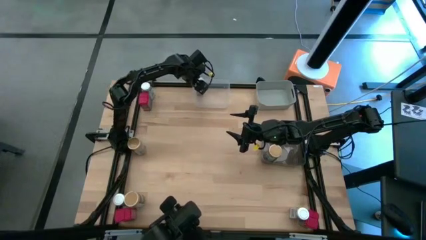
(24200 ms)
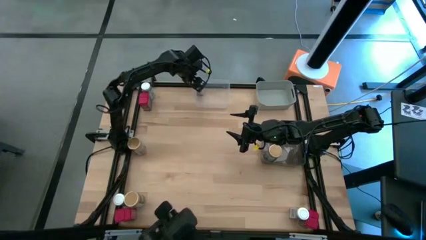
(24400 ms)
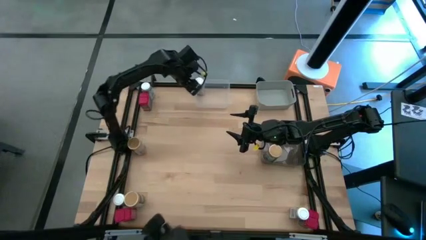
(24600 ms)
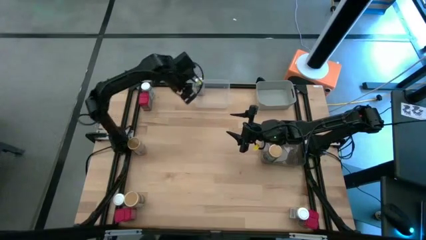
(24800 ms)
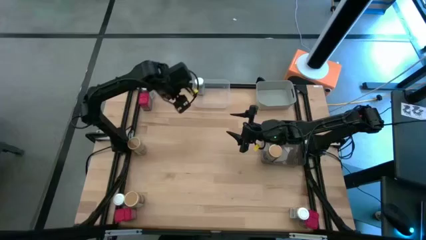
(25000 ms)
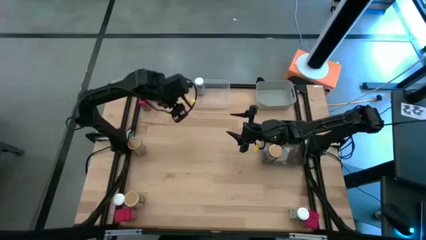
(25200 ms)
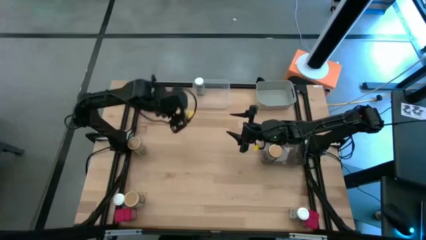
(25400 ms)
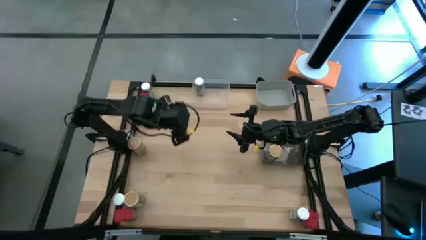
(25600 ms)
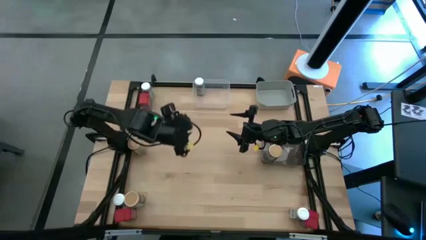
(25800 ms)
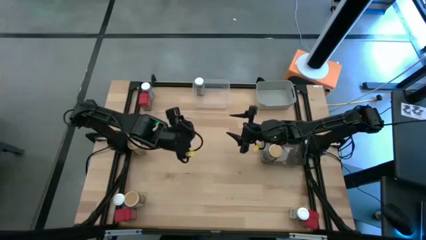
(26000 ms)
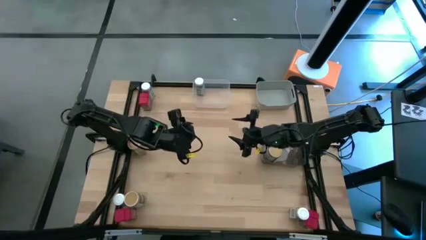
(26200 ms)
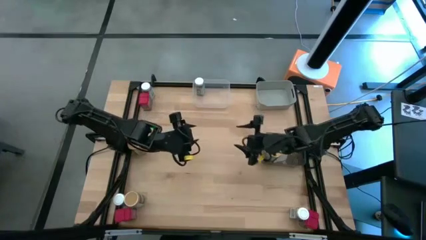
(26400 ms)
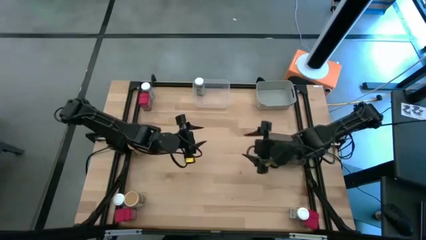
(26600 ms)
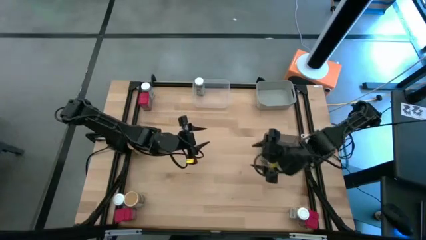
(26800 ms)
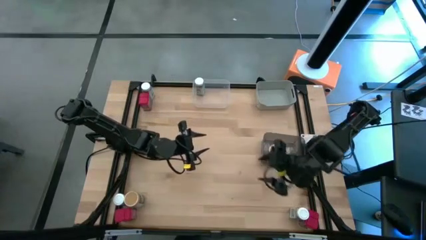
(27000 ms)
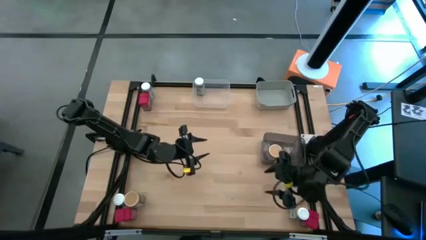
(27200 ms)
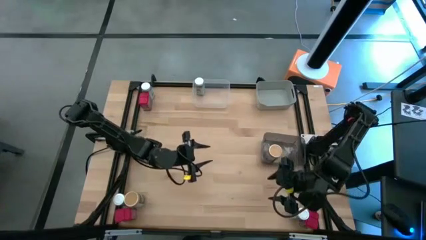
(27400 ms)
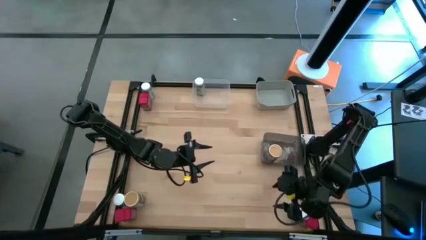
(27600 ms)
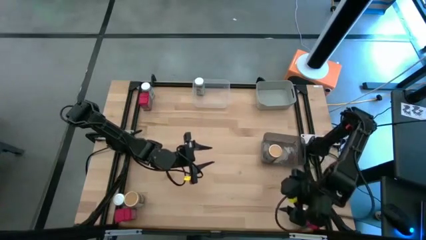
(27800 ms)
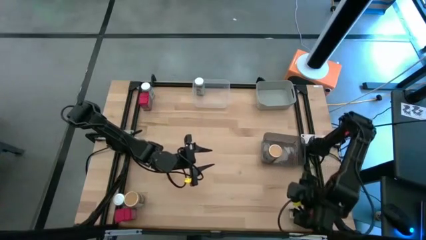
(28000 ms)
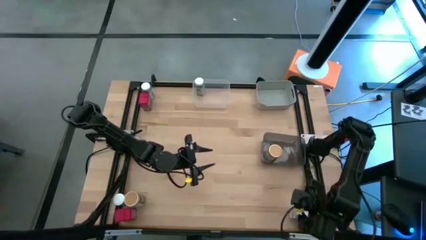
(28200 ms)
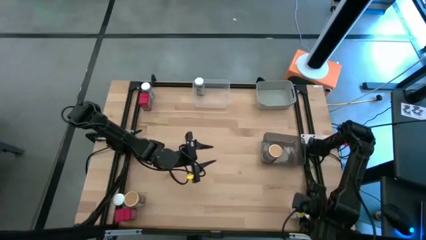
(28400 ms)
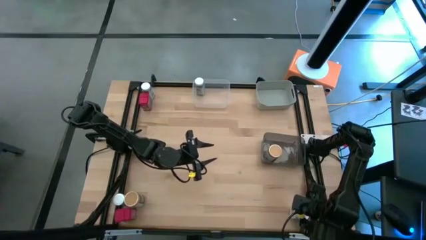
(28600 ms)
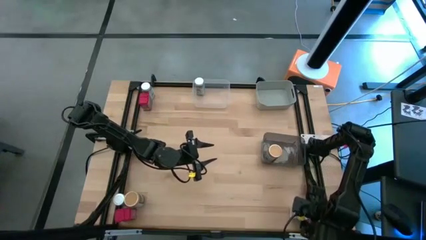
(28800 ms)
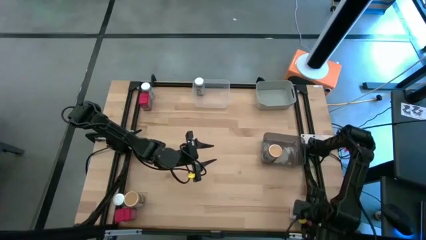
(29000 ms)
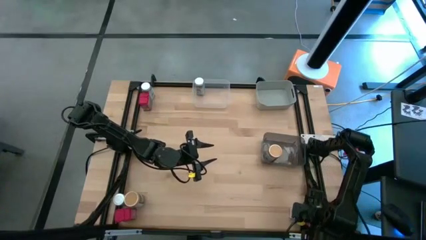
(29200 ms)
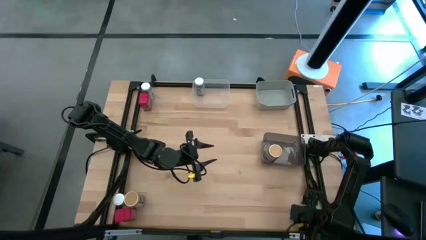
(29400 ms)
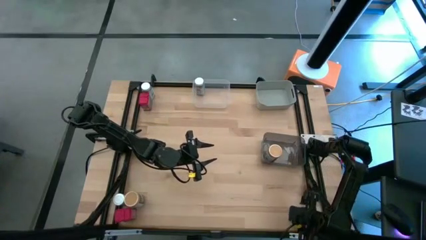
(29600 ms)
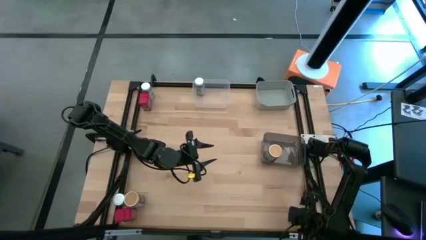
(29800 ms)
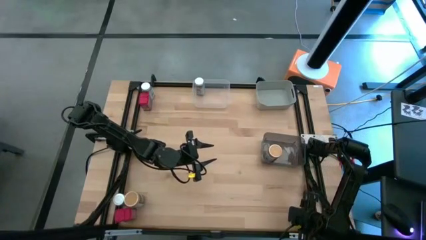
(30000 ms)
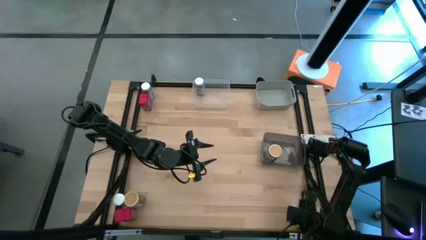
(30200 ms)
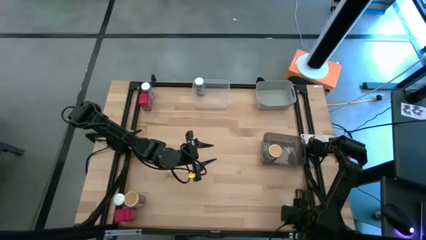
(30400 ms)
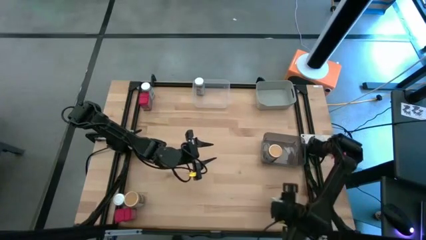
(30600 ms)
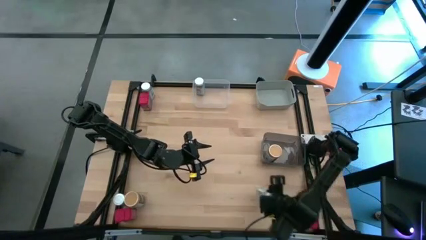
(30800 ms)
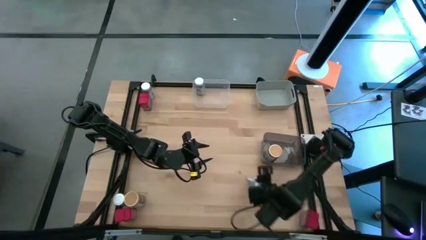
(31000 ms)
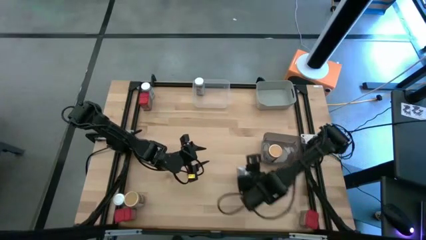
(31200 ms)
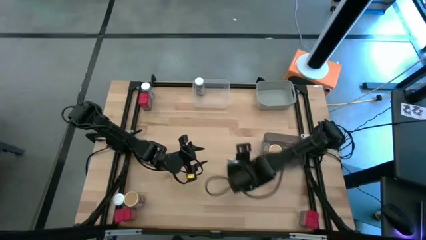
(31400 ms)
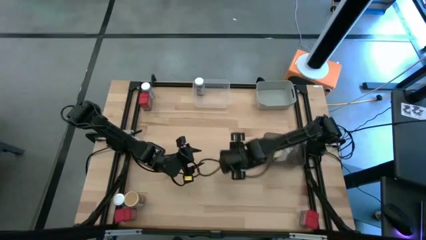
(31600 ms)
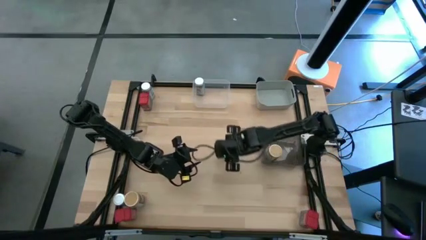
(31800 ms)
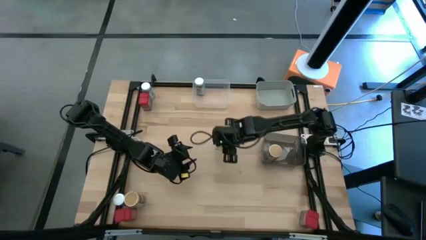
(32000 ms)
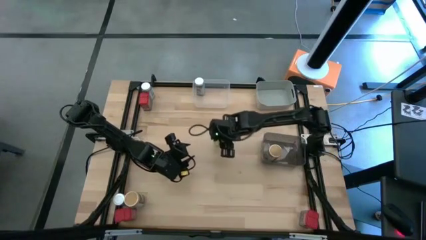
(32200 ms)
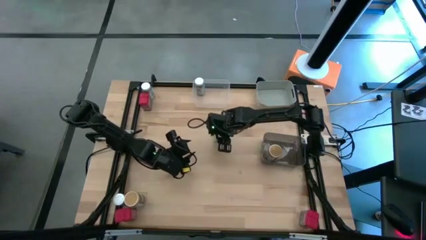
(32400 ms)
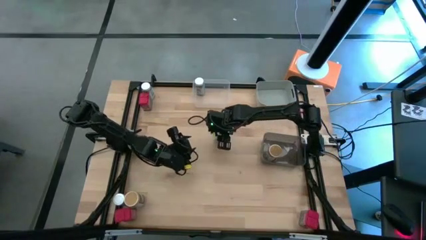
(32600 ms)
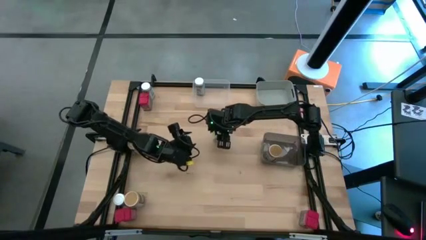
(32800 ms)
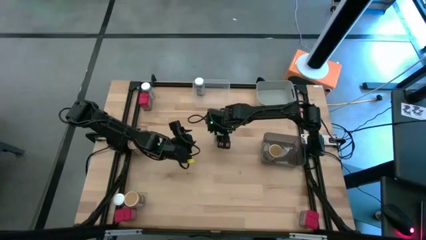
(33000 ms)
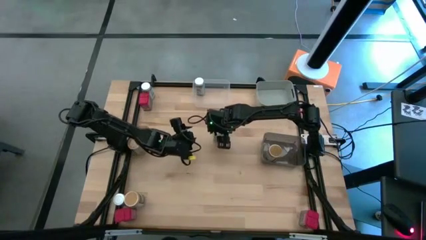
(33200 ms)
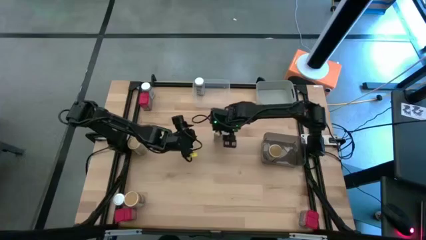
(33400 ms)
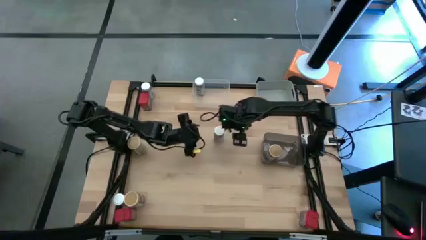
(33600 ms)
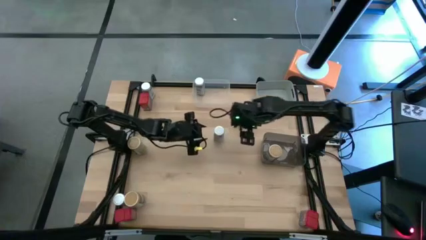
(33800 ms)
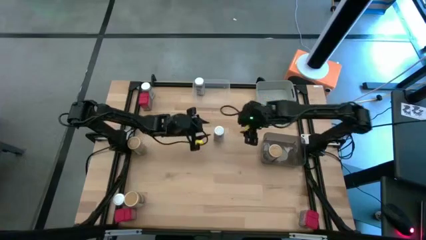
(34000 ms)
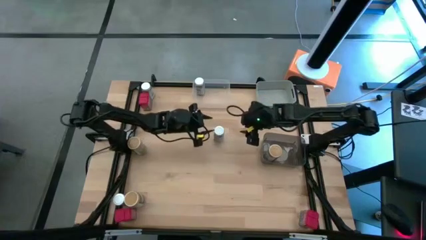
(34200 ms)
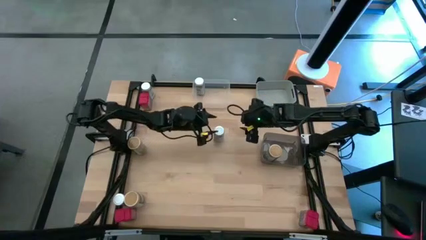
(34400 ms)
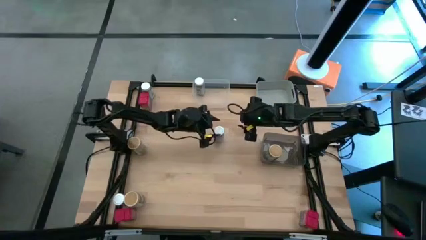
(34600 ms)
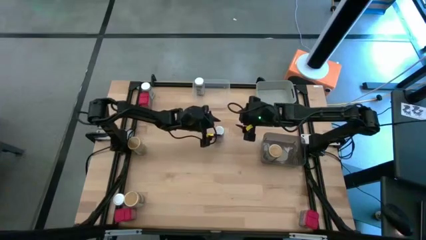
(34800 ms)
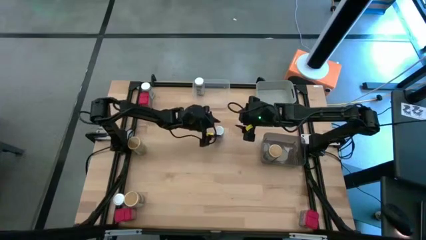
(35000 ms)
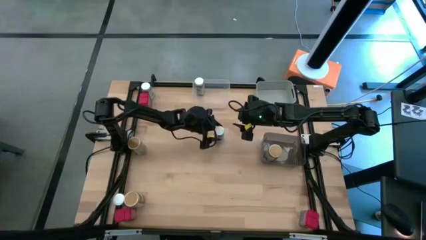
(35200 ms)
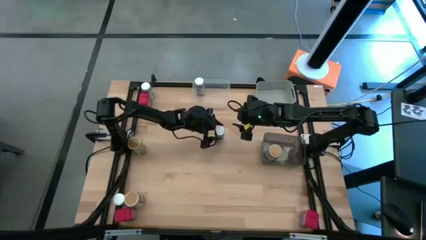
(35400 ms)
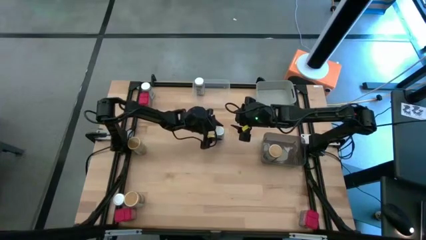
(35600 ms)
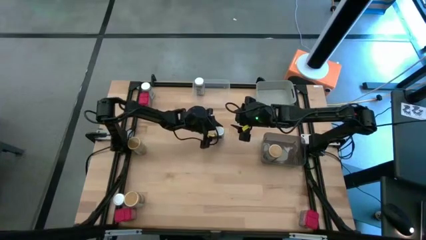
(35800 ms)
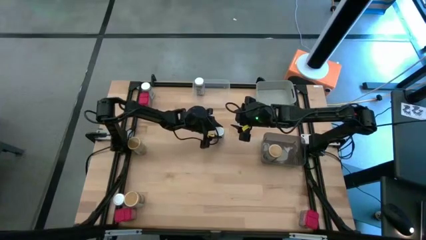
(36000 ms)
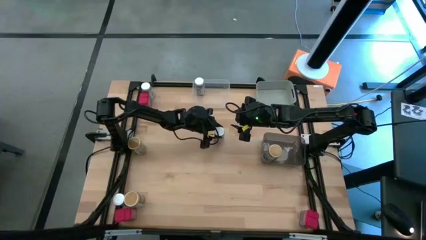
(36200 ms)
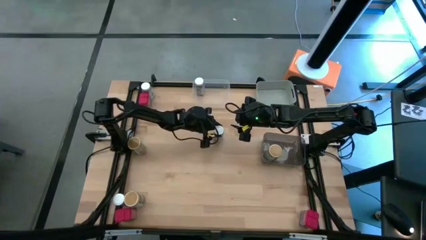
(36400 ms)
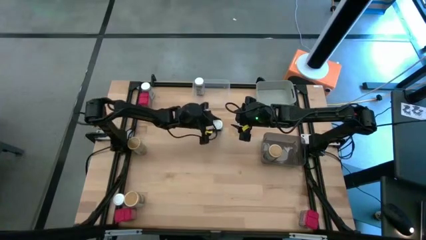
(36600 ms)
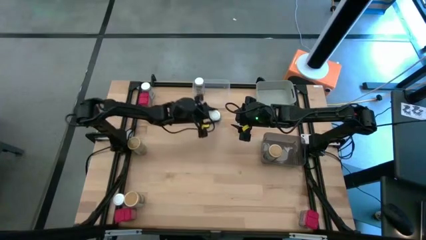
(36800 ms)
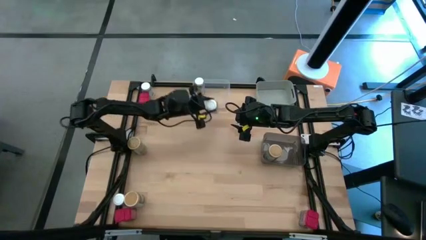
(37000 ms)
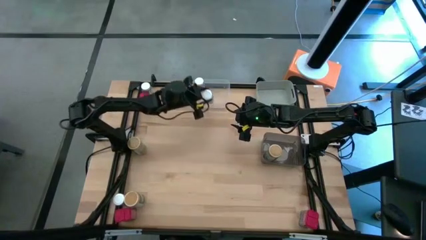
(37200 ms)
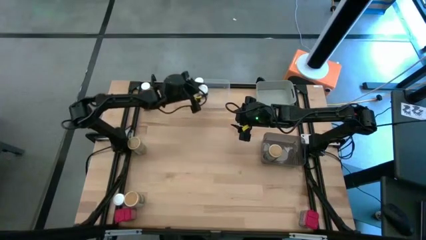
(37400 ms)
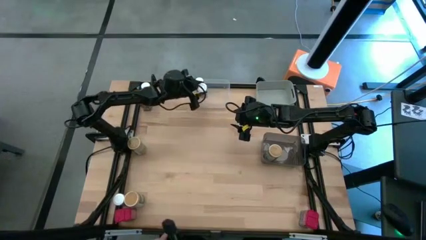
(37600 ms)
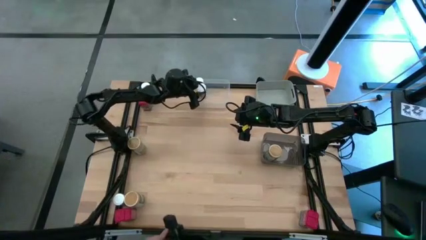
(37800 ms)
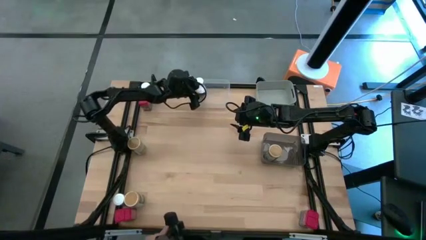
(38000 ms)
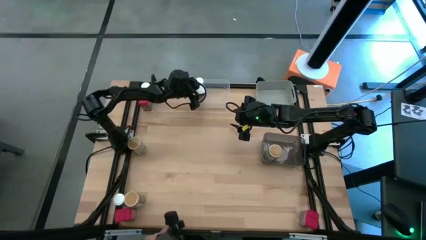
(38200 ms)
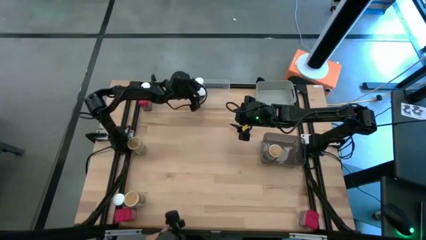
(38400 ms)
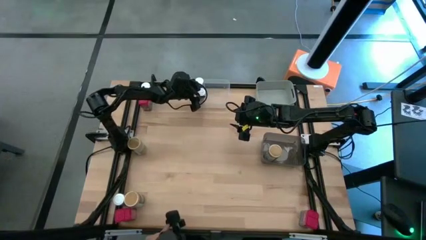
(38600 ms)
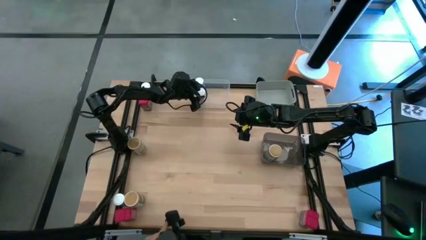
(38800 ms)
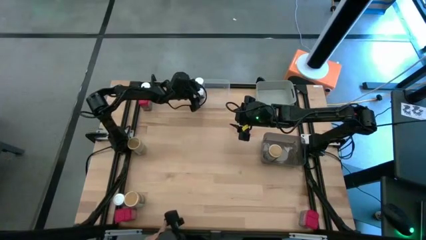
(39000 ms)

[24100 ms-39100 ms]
Task: Sort spices by type
Put the bottom right white seasoning bottle into the transparent bin
